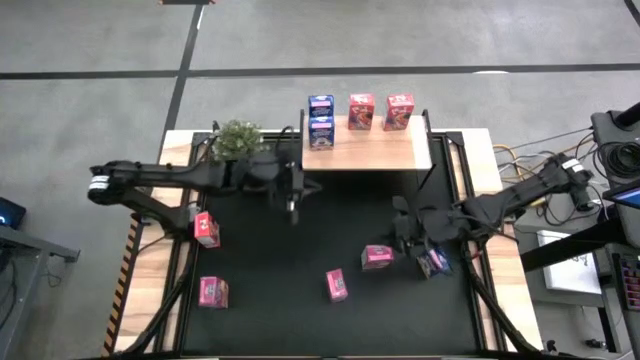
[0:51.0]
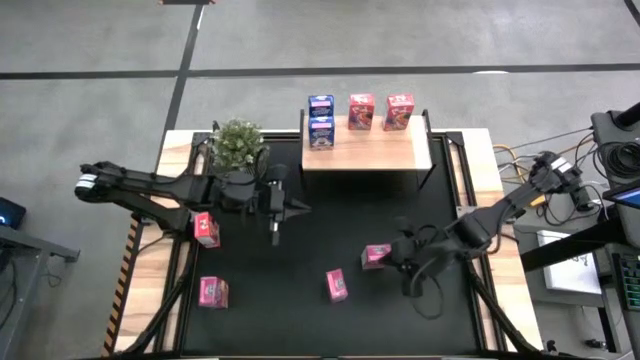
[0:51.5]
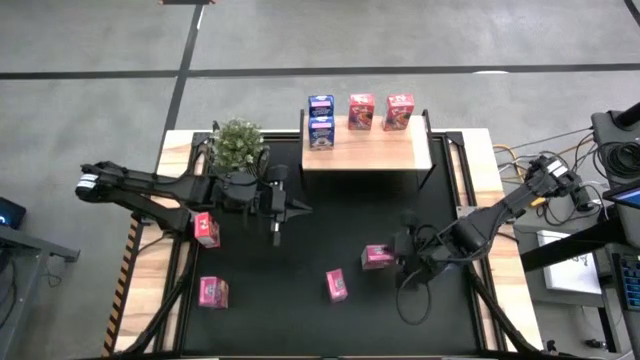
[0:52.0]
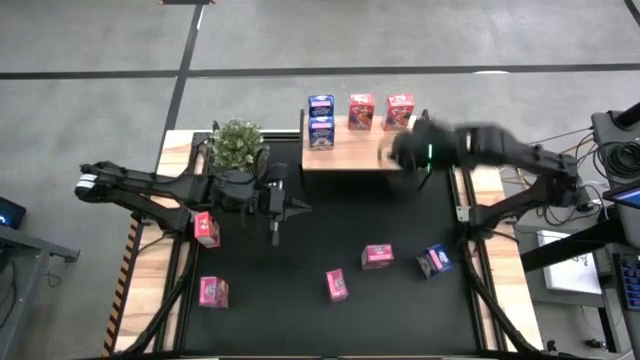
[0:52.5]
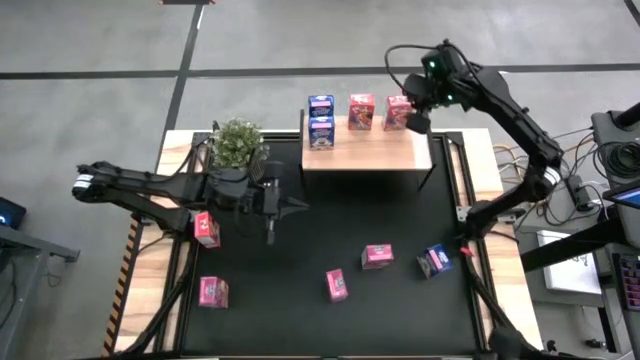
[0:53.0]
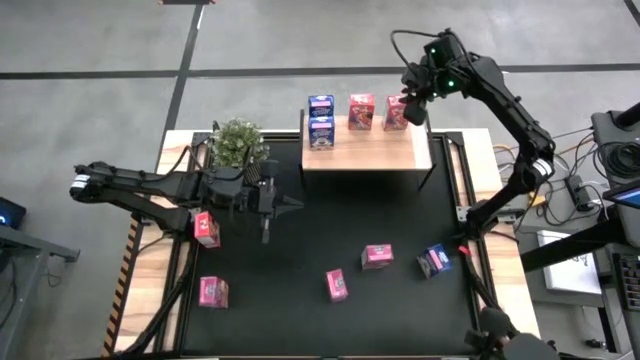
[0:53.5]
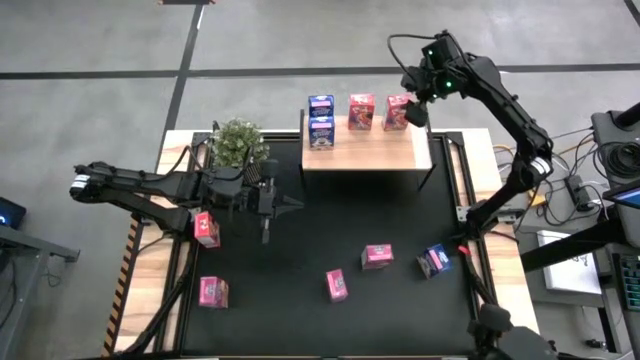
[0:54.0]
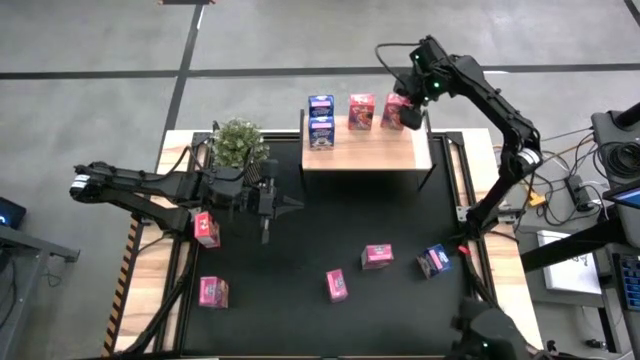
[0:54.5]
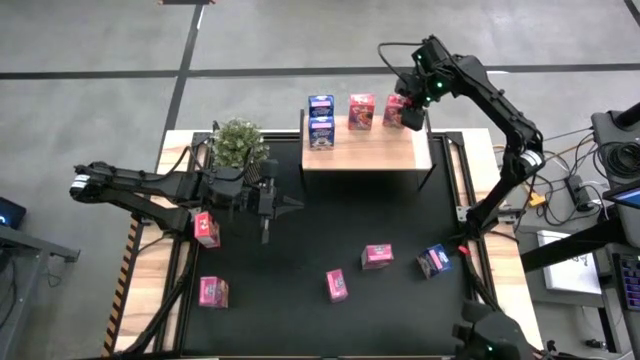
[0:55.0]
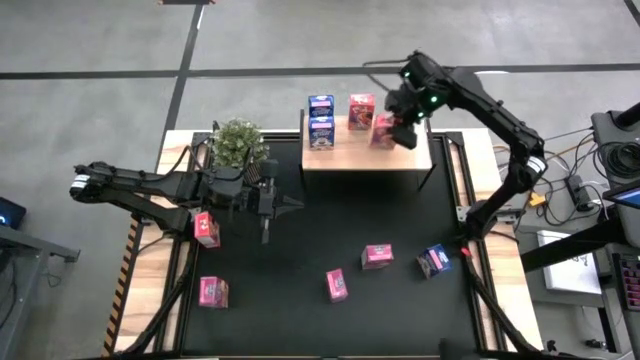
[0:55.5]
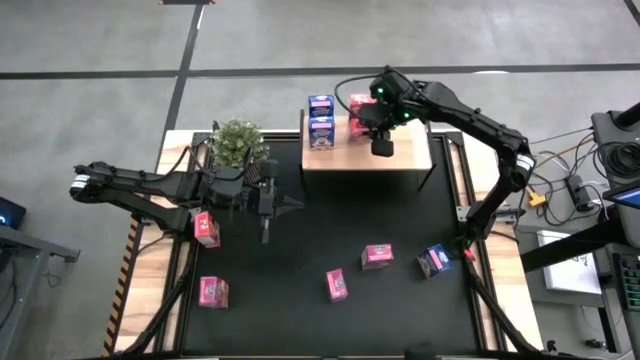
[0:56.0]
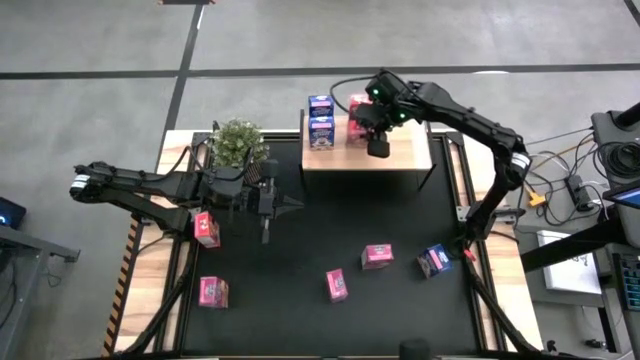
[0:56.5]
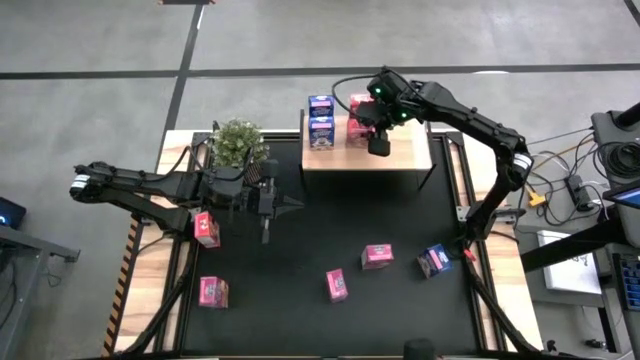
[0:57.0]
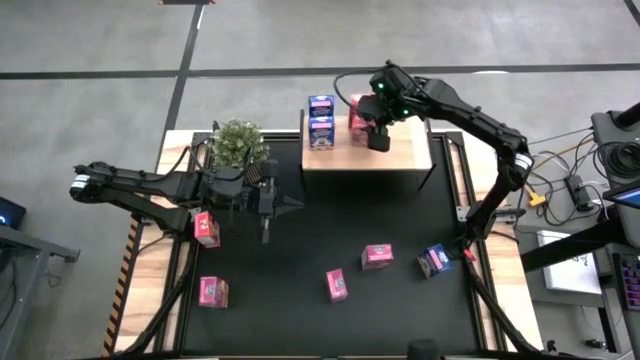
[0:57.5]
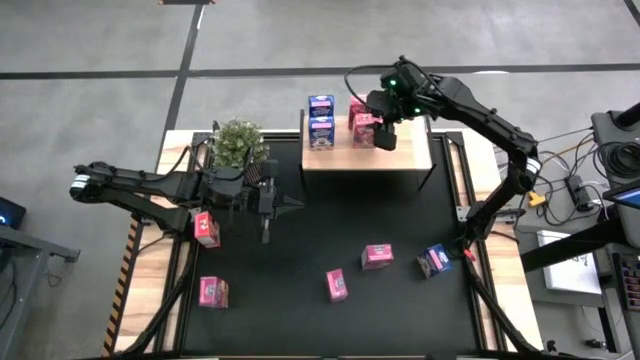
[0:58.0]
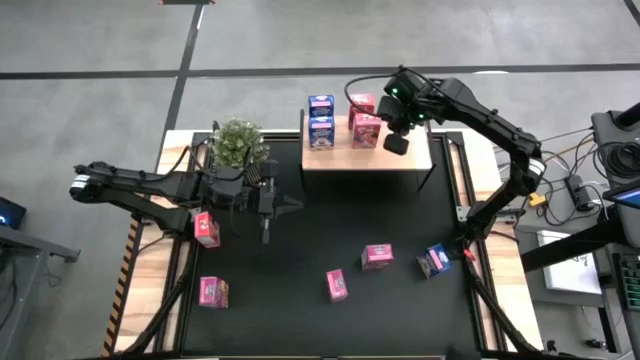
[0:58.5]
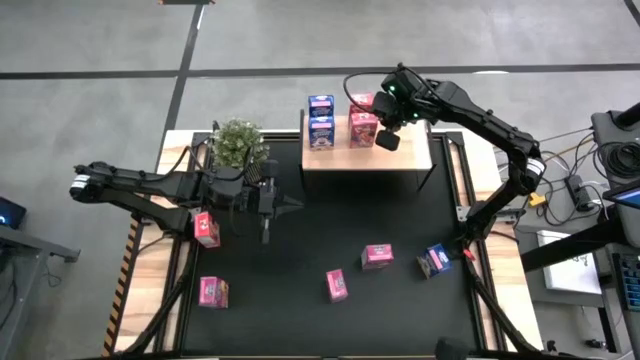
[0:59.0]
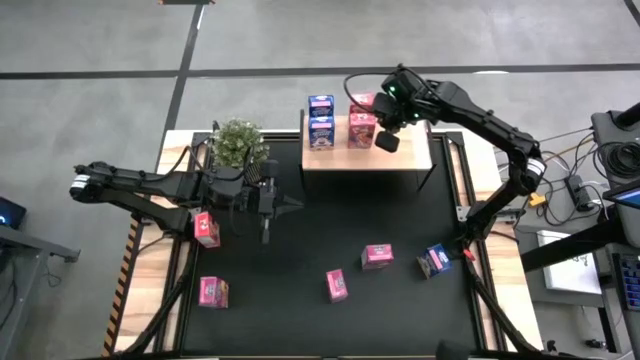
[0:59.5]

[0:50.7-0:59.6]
Task: Stack cereal on shelf
Adjust the red cereal box on the shelf and align it with the other red cereal box on the shelf

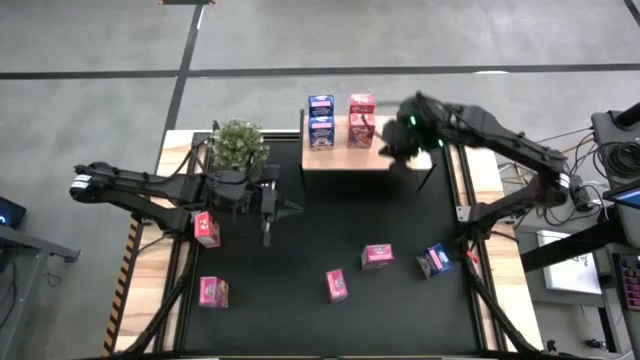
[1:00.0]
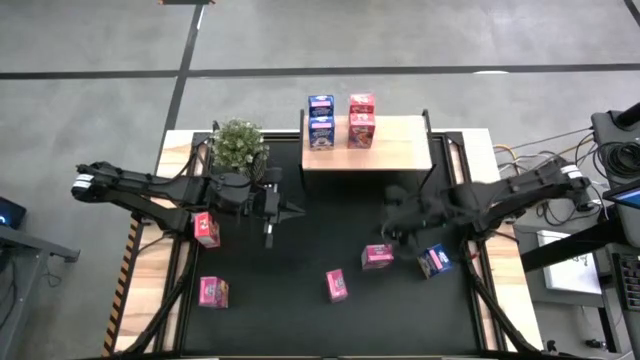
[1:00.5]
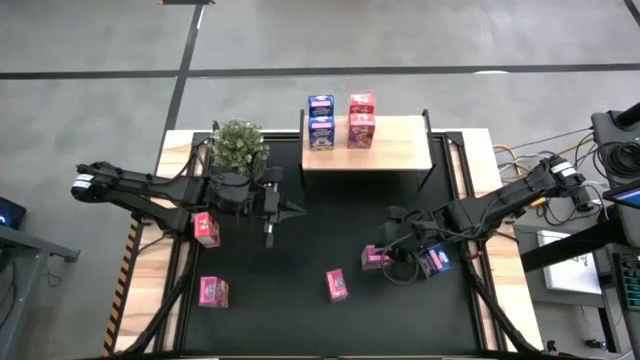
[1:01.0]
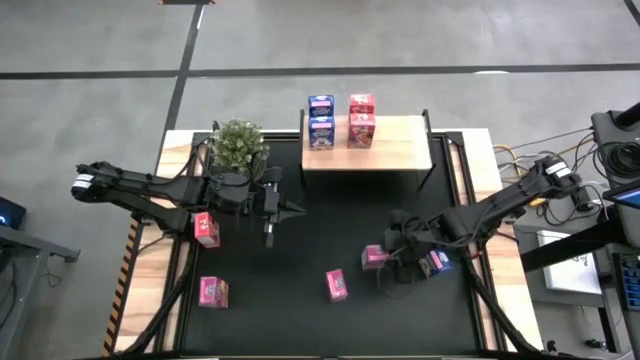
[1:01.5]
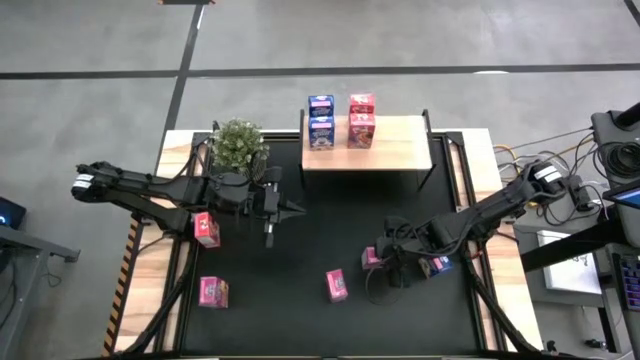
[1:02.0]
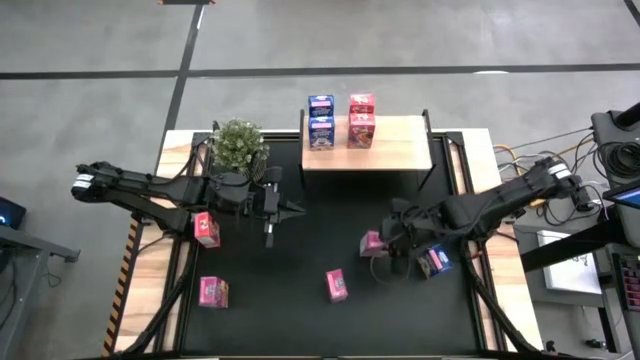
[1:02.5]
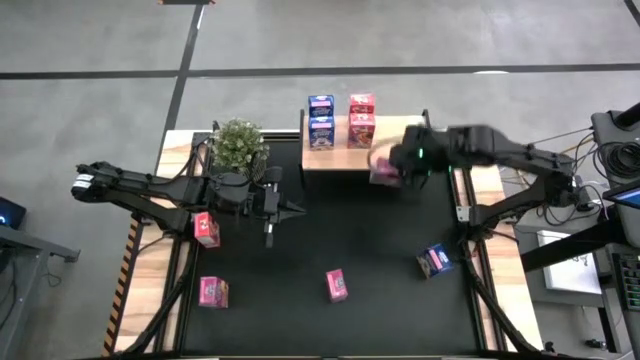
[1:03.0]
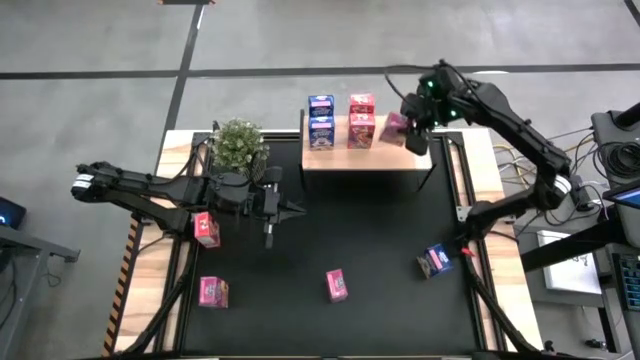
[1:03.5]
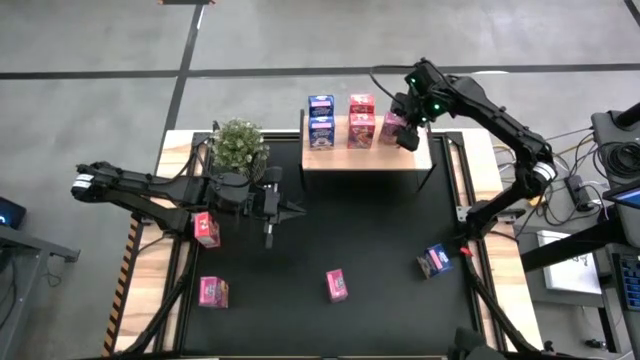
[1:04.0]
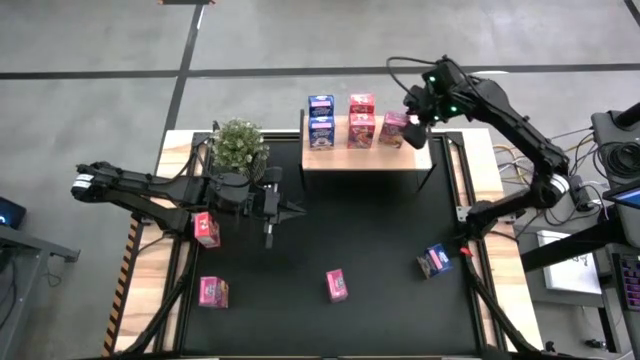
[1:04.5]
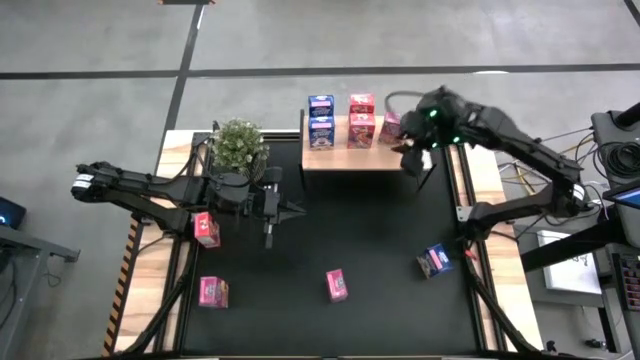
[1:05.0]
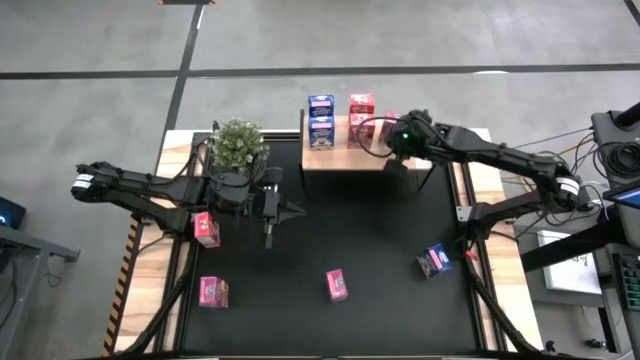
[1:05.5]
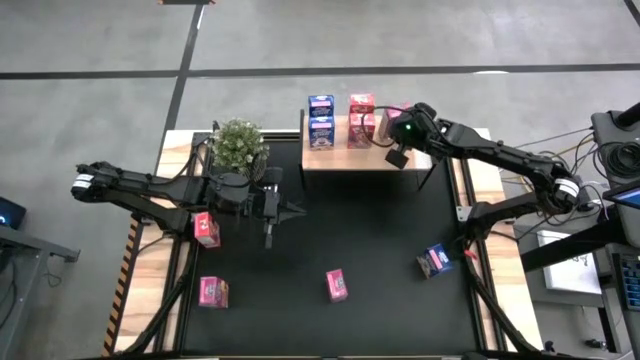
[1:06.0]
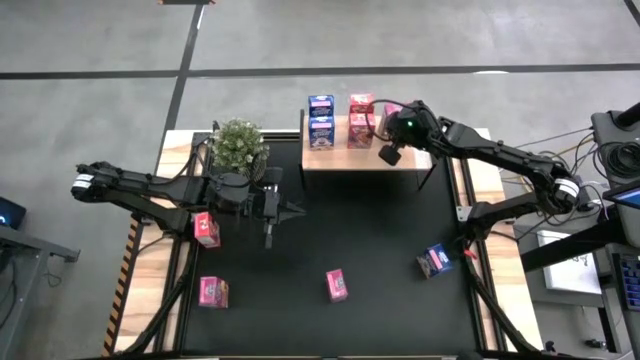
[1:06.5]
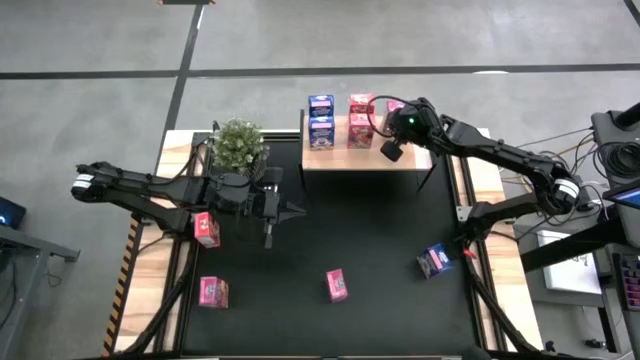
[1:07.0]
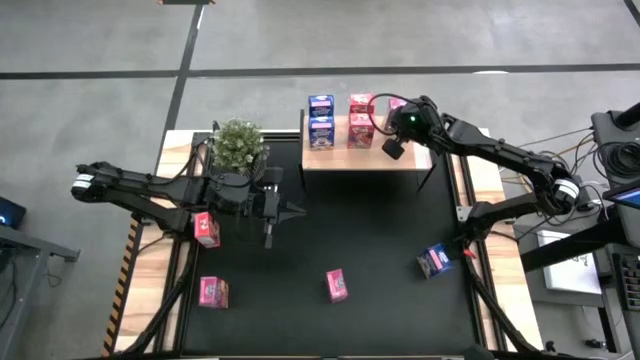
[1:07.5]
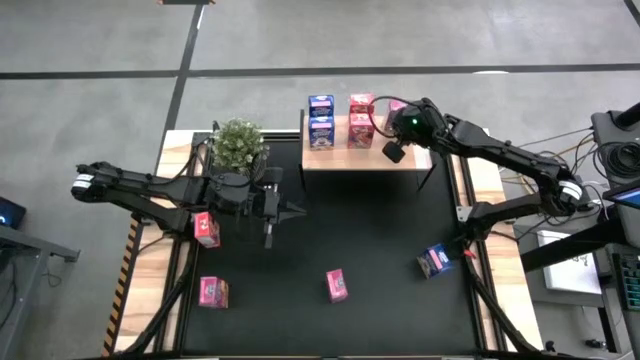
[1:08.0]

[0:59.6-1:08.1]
Put the top right purple cereal box on the shelf

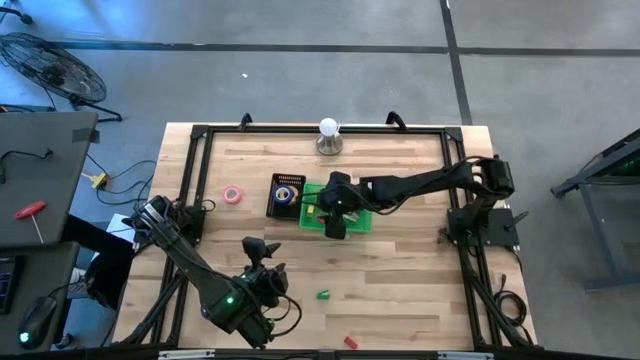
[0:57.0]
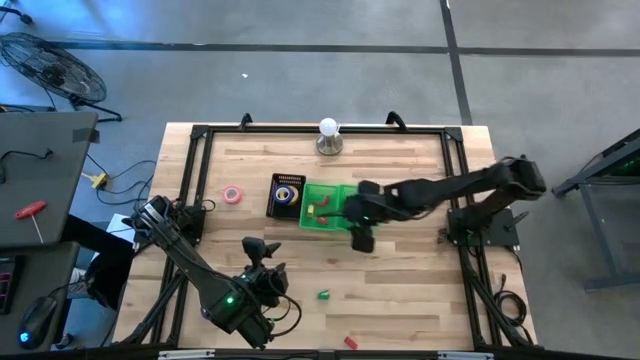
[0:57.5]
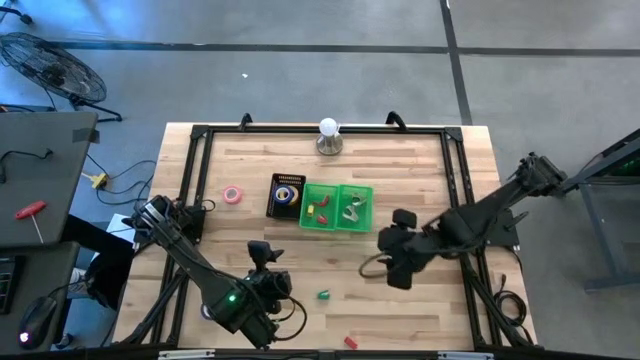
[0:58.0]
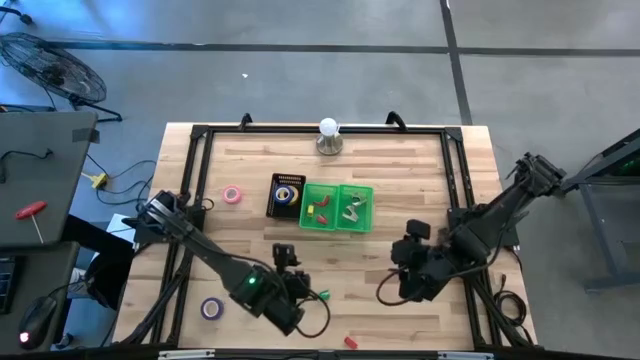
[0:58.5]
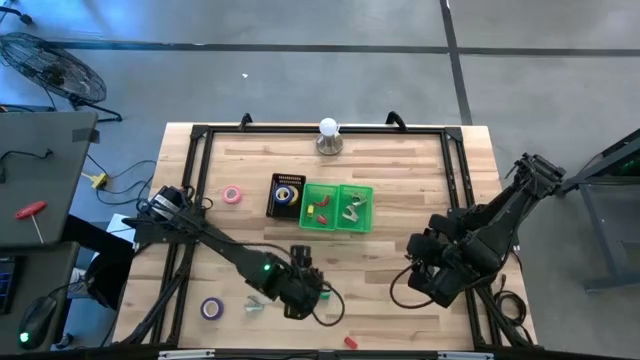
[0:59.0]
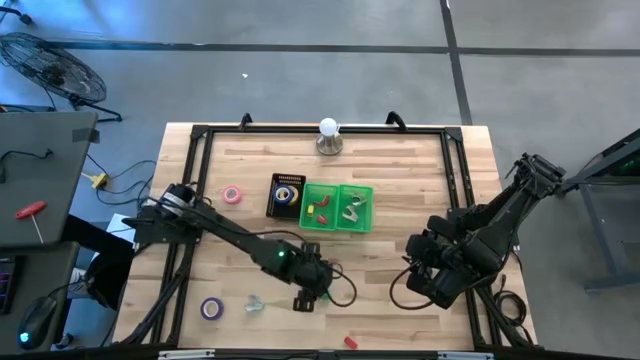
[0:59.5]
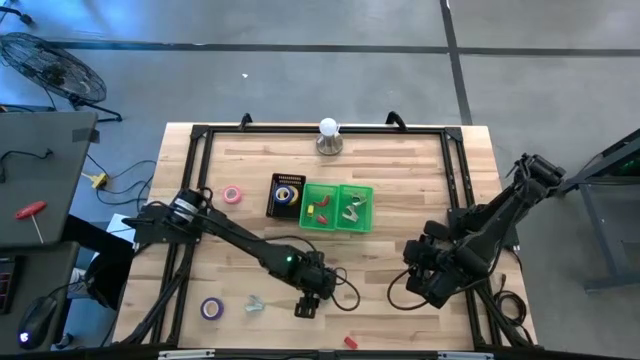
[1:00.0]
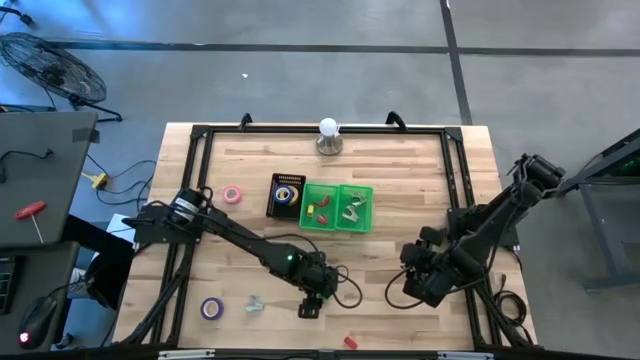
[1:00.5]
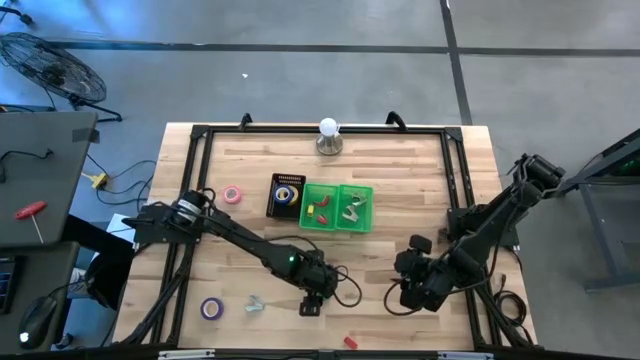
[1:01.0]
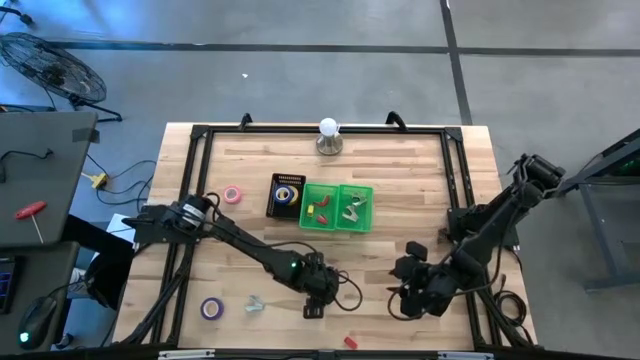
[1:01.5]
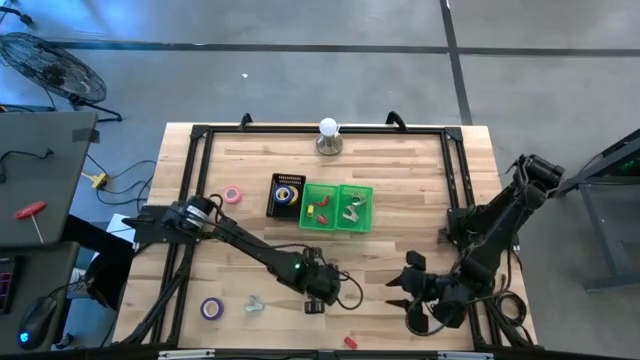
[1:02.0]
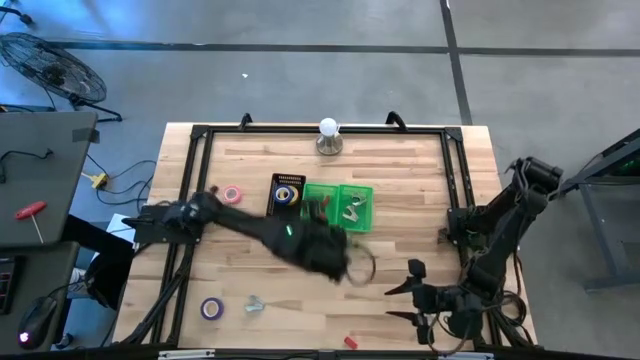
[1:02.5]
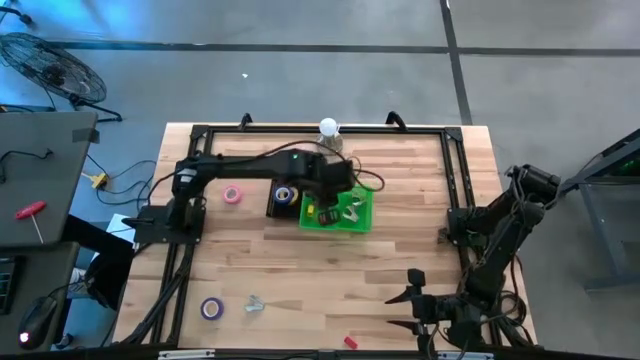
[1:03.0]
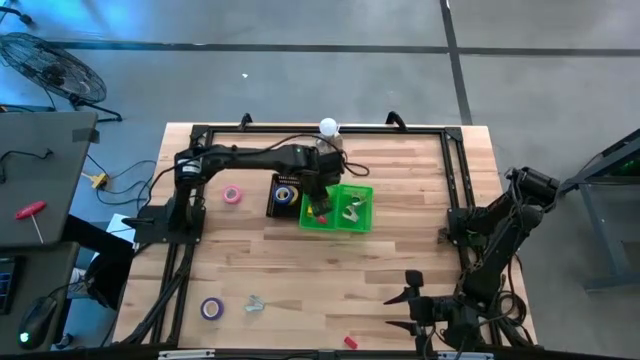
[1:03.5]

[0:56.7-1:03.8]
Task: Pick and place Stapler, Stapler remover, tape
Put the green stapler into the left green bin
